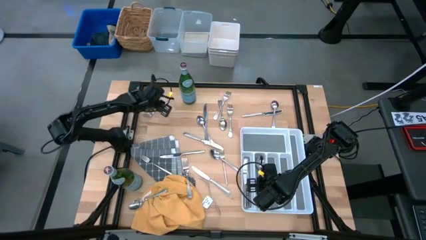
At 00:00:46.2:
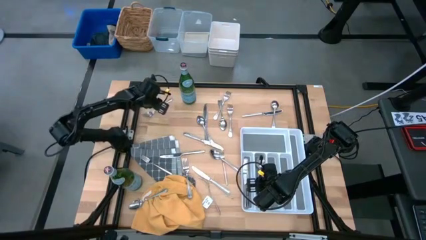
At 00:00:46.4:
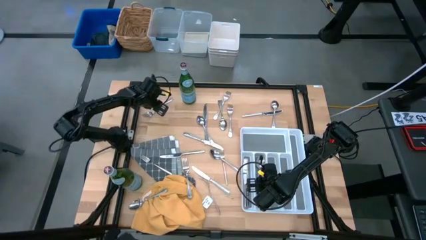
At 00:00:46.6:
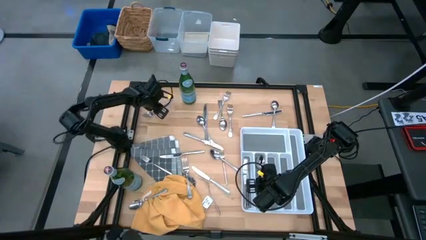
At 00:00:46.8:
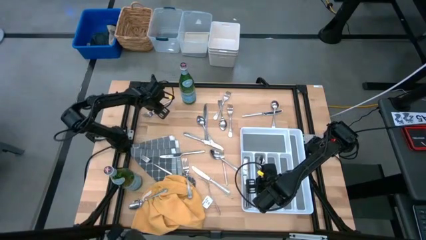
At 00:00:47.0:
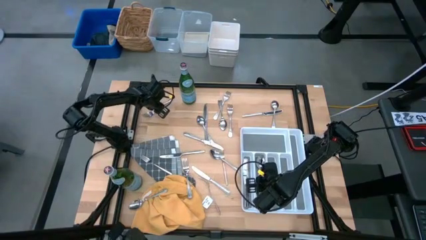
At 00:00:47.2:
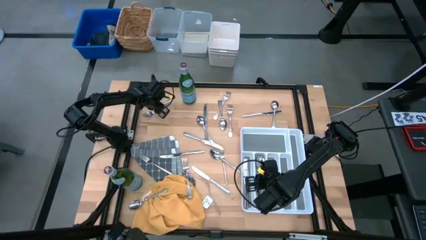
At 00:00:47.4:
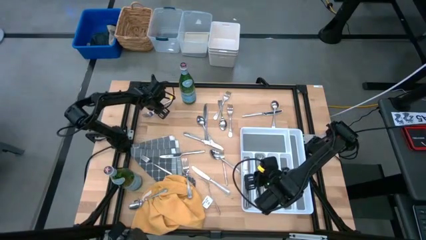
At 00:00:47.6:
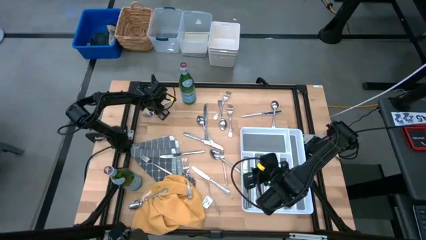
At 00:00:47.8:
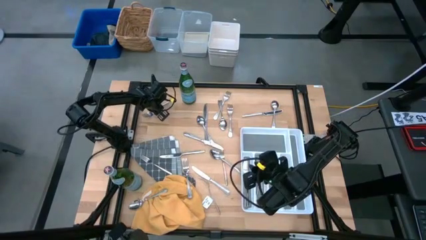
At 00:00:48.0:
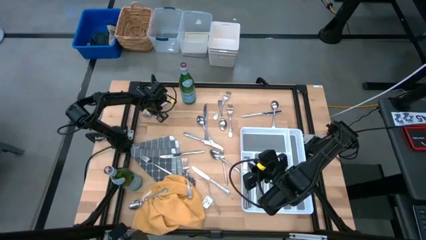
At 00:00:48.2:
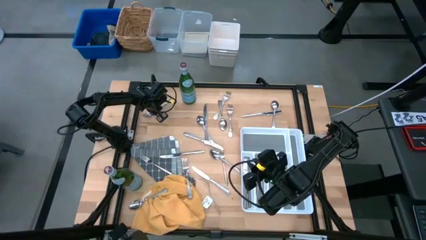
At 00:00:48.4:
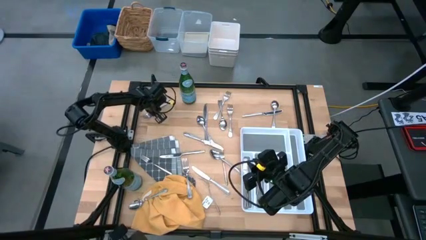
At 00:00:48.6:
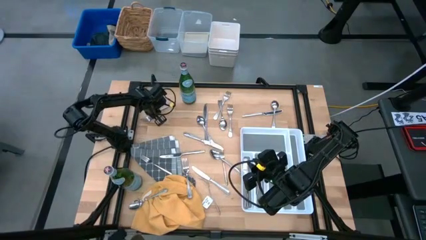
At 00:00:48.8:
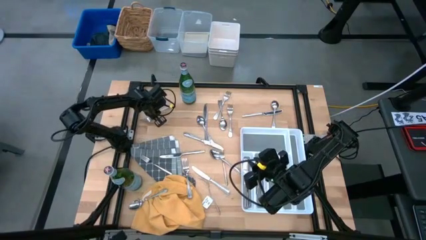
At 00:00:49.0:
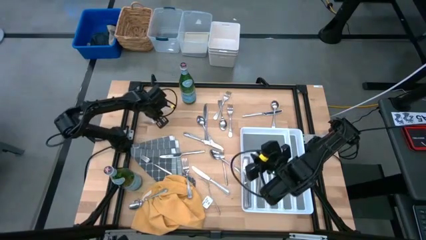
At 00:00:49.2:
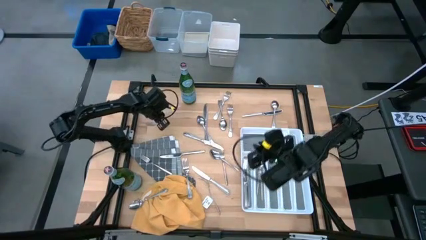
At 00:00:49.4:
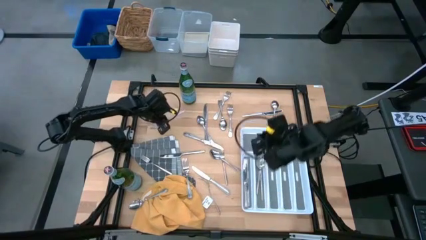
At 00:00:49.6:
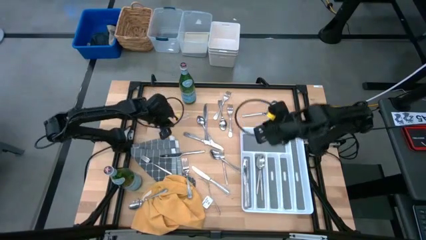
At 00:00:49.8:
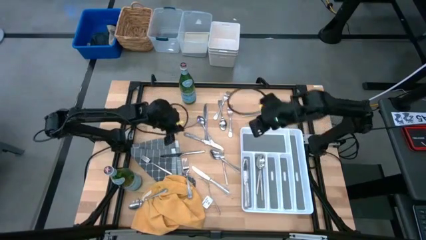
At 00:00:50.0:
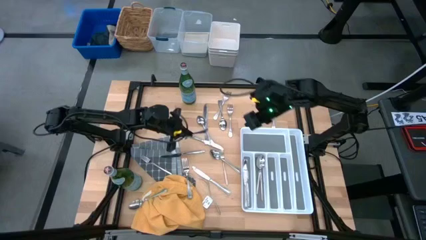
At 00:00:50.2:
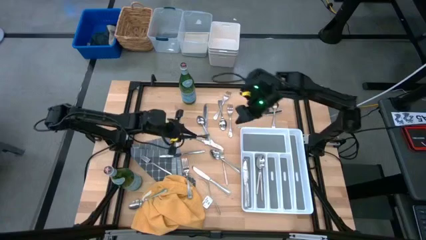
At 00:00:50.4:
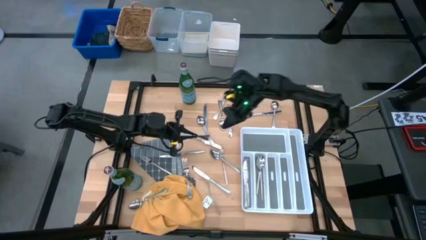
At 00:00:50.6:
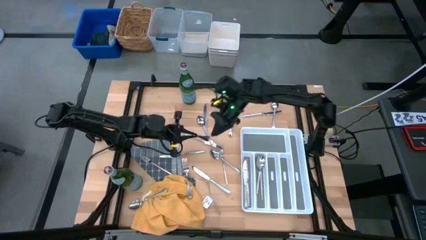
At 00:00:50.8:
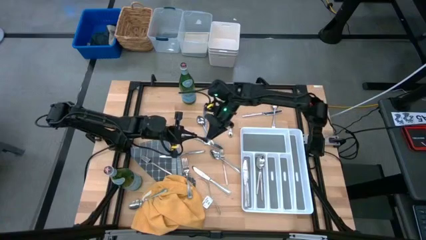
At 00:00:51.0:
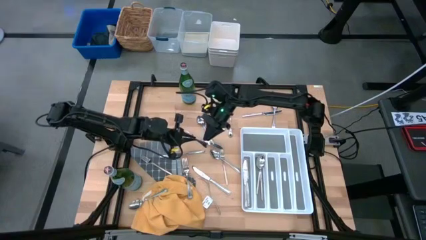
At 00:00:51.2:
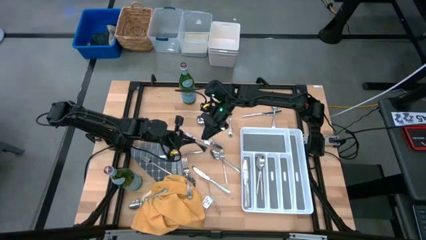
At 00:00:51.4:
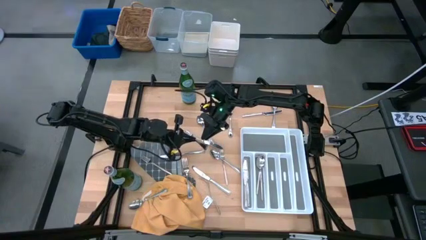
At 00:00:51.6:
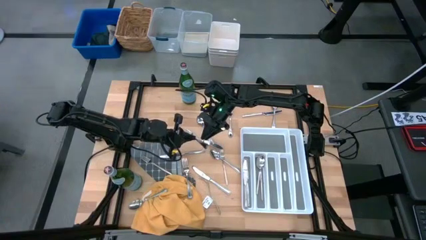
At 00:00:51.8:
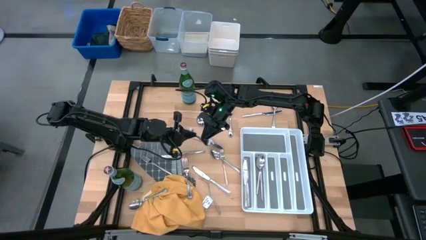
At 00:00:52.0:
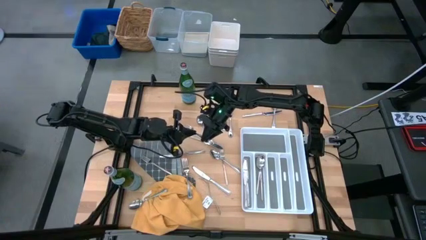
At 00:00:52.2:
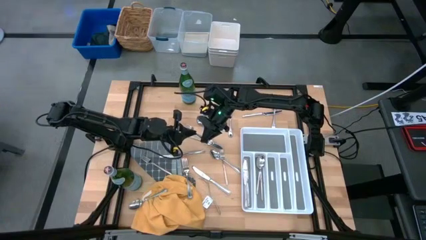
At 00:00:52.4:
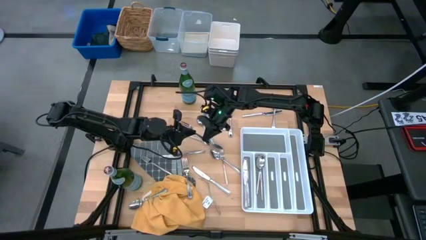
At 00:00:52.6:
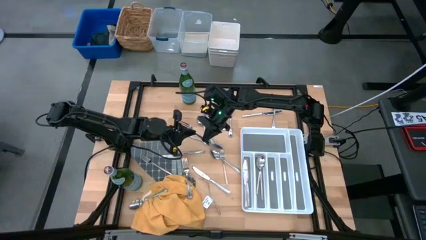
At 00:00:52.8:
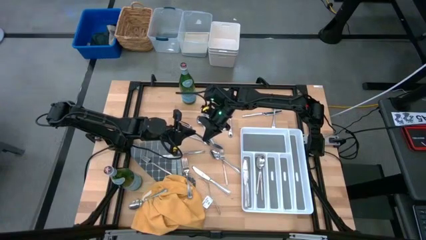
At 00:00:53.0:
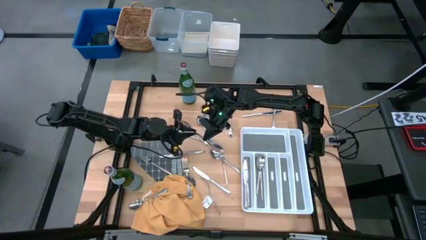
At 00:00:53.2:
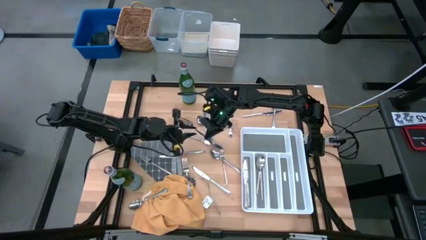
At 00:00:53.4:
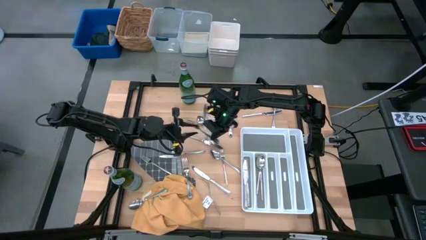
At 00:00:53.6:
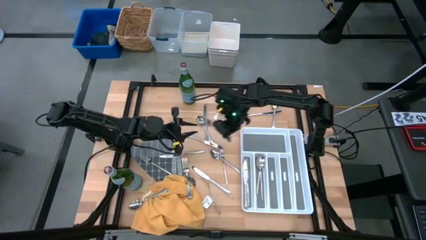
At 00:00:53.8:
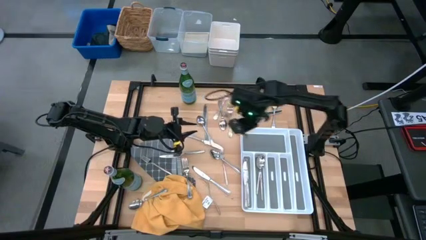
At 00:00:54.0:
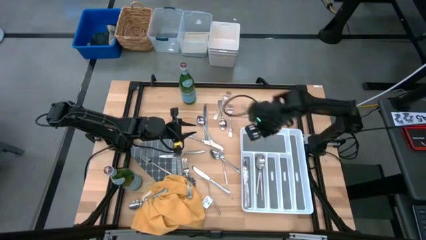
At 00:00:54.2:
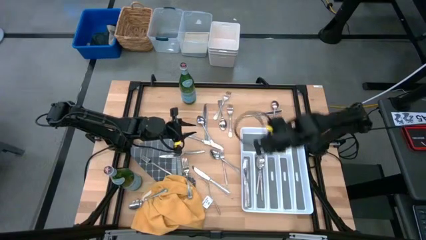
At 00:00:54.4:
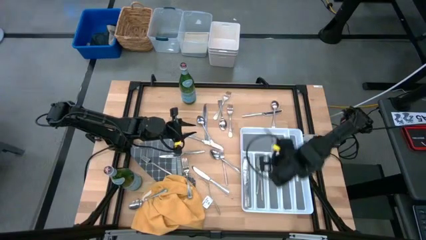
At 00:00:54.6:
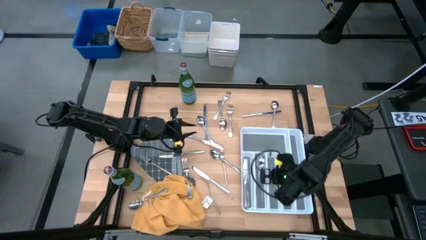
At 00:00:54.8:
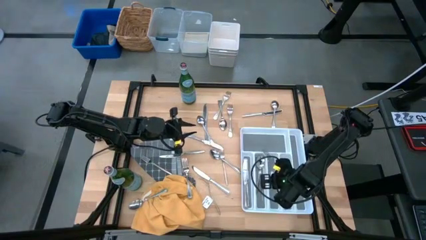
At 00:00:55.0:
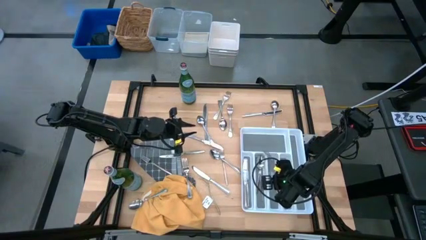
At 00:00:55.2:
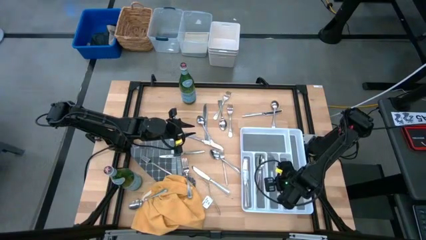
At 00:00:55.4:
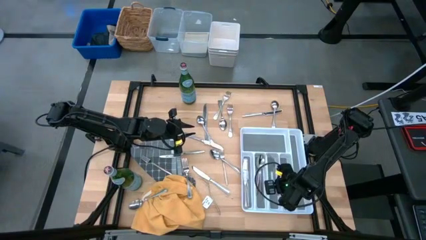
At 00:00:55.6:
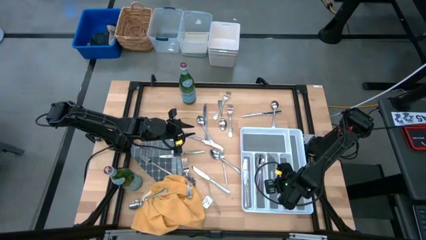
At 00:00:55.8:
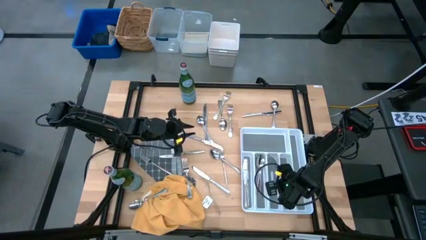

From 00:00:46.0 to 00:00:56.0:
Put the silver fork into the white utensil tray

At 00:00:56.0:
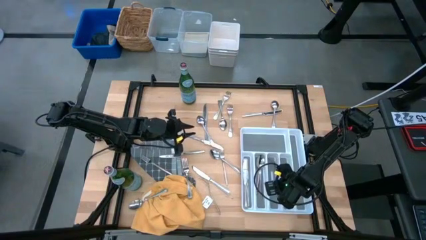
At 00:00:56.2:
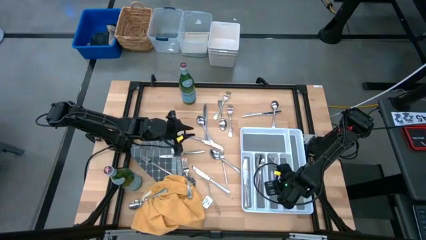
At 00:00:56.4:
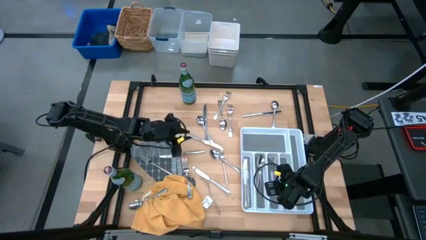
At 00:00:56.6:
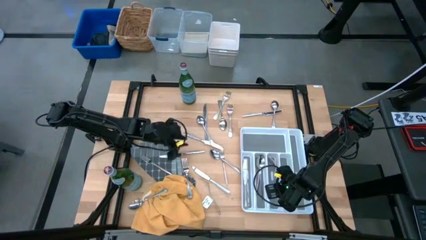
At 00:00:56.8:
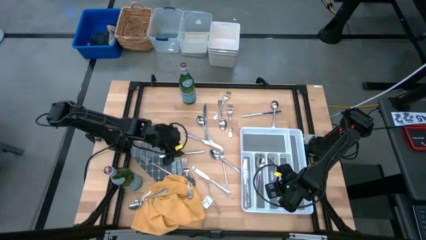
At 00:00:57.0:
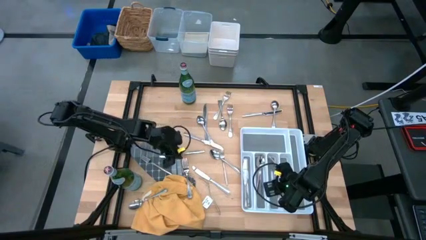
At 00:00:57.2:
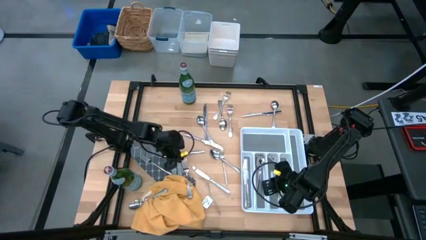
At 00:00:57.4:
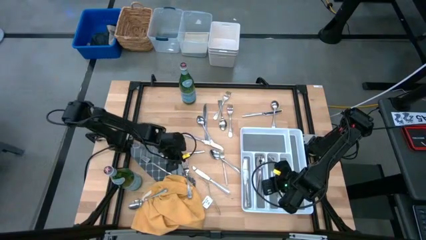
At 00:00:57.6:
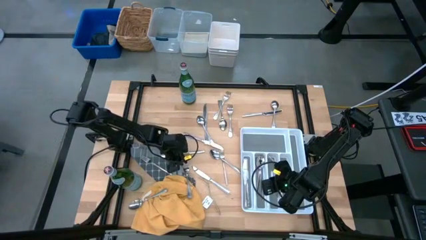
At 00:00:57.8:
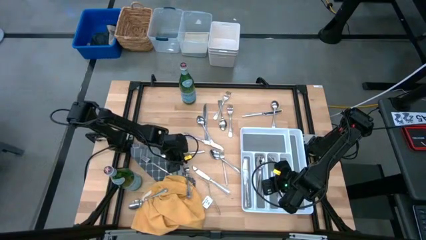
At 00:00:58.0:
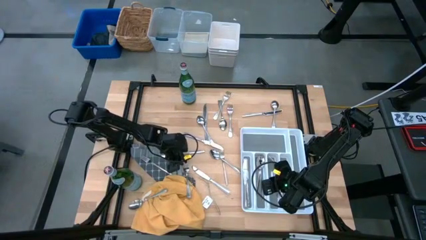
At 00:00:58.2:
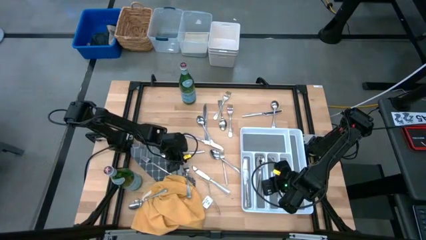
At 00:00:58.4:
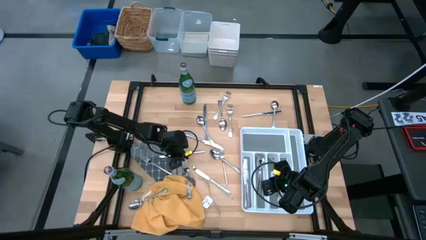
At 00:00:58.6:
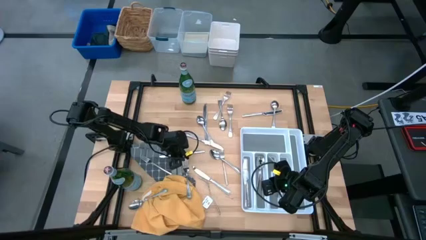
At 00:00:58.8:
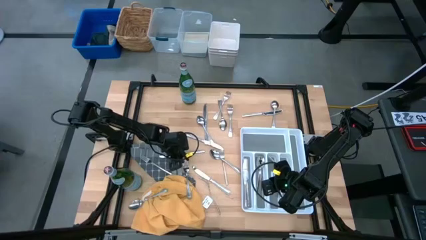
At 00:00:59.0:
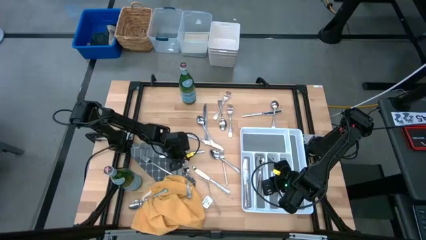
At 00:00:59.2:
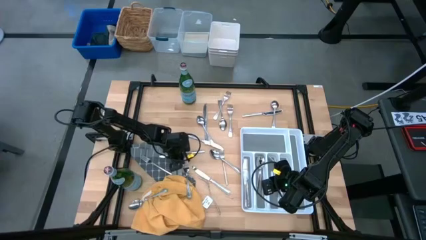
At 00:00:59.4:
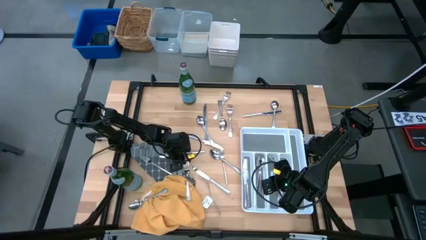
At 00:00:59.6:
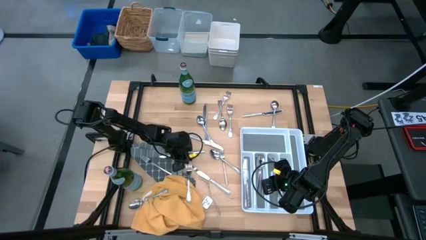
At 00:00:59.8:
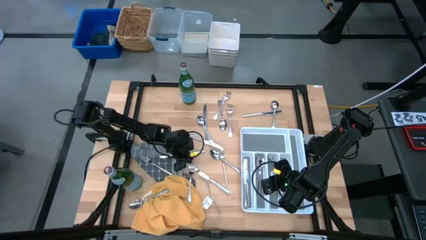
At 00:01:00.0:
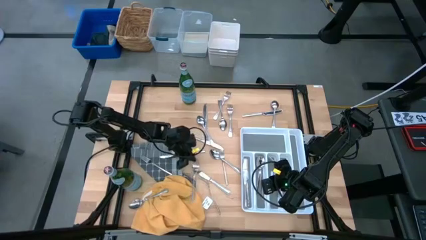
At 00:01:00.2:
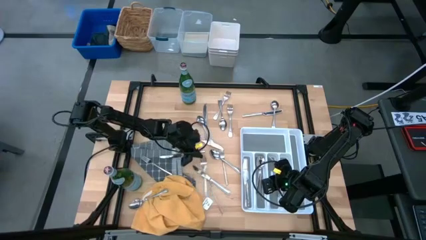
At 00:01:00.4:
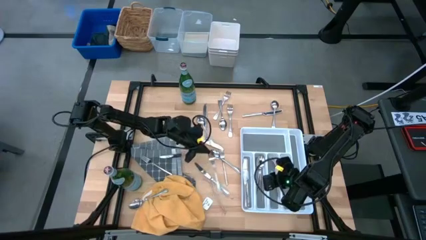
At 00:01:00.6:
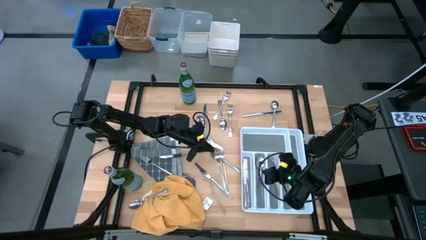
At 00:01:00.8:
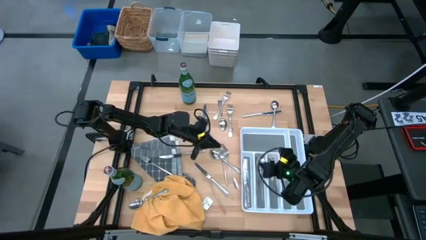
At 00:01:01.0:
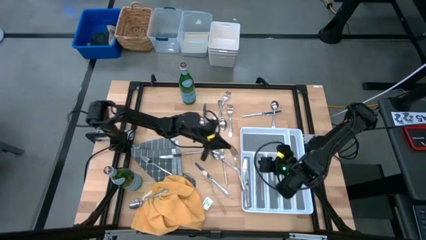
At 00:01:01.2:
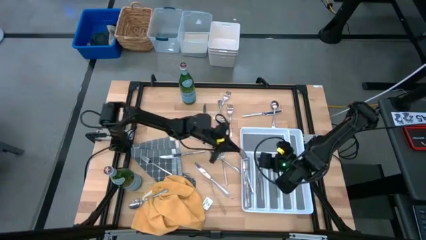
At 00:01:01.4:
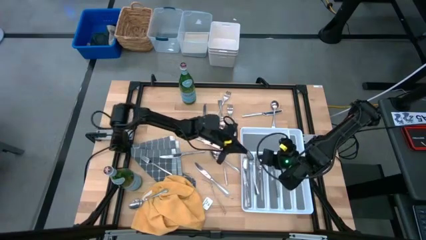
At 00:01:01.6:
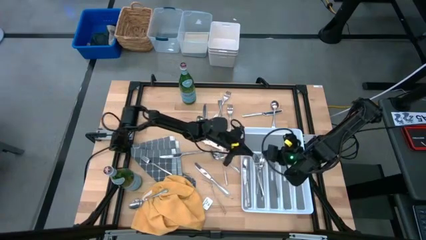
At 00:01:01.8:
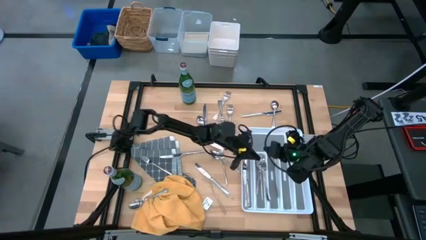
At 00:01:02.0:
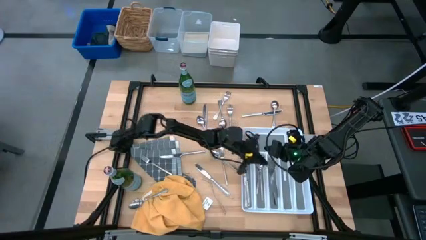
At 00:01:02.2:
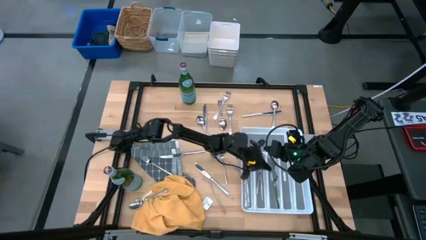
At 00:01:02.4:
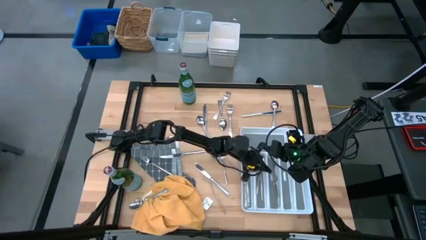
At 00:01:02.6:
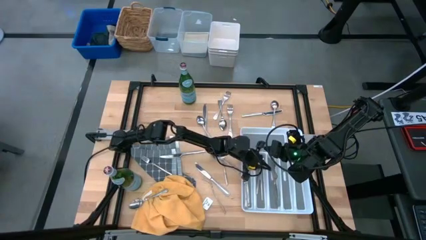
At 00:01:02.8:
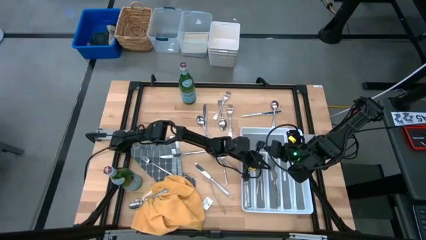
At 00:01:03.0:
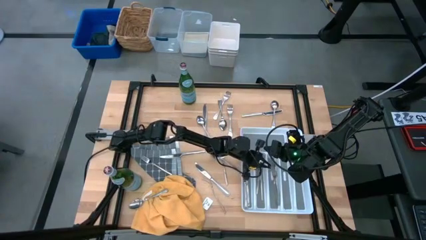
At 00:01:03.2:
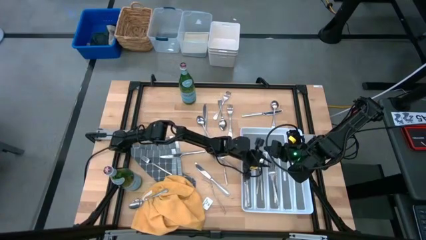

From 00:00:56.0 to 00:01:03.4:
Stack the silver fork into the white utensil tray with the other silver fork
